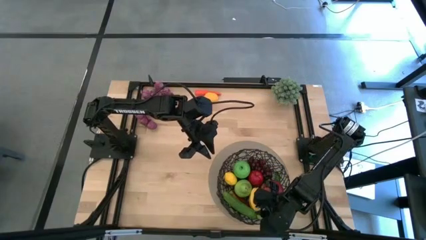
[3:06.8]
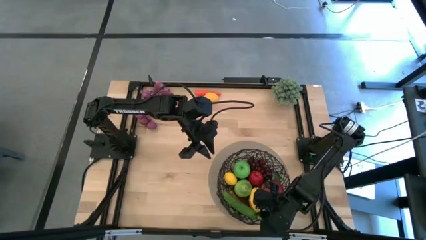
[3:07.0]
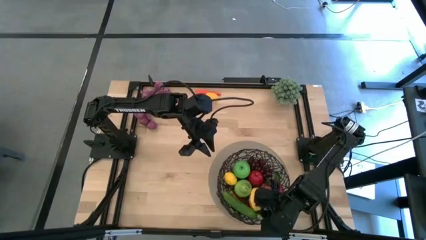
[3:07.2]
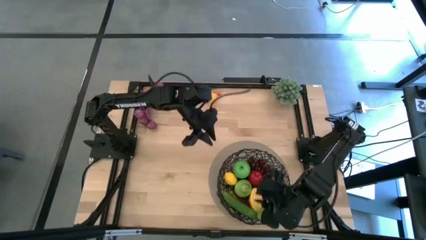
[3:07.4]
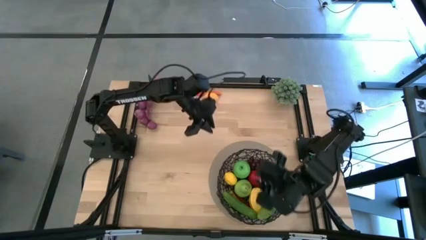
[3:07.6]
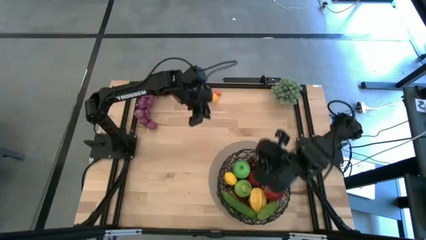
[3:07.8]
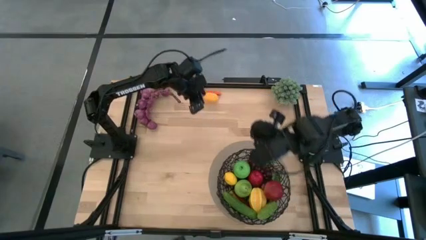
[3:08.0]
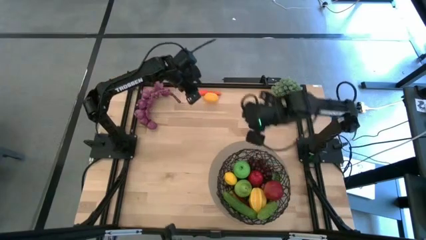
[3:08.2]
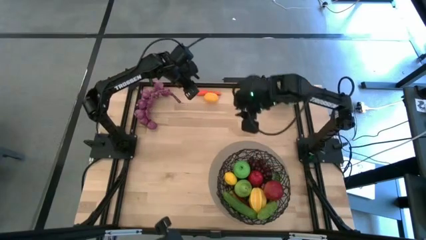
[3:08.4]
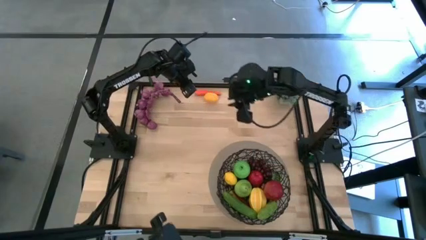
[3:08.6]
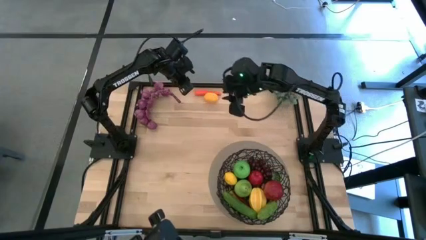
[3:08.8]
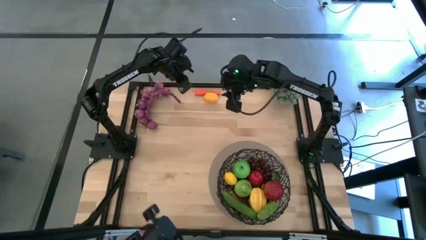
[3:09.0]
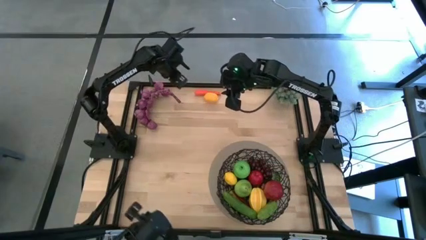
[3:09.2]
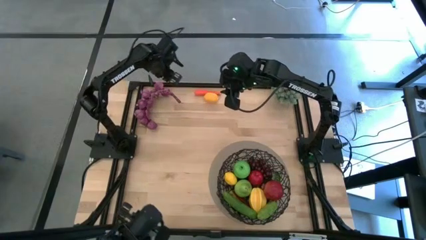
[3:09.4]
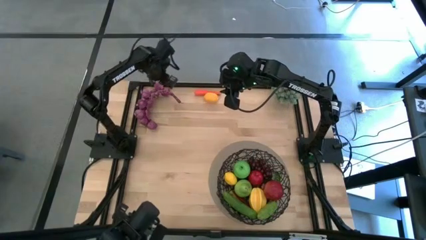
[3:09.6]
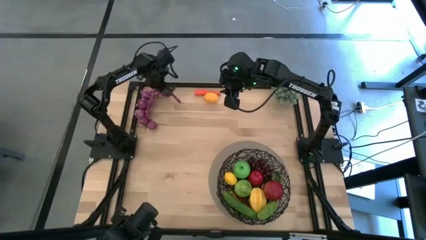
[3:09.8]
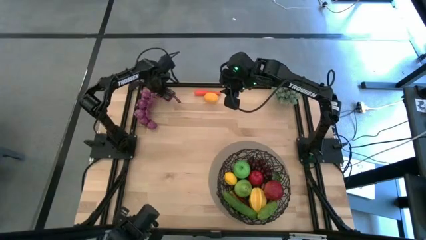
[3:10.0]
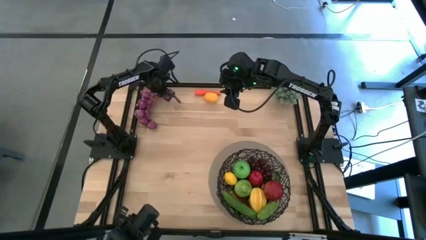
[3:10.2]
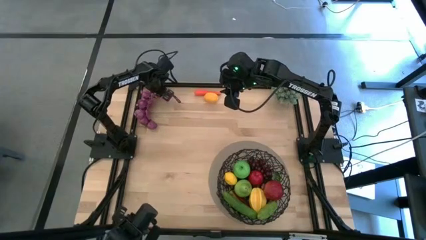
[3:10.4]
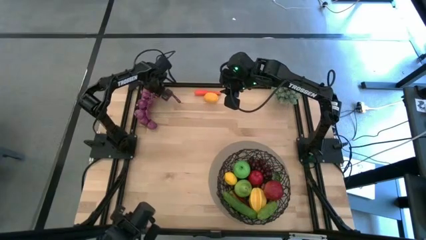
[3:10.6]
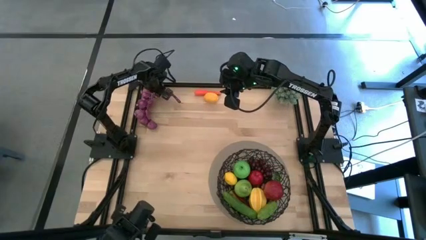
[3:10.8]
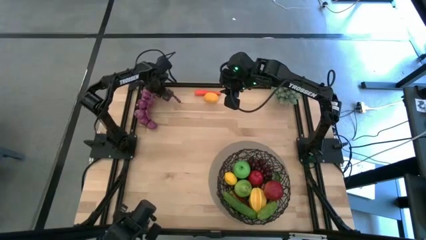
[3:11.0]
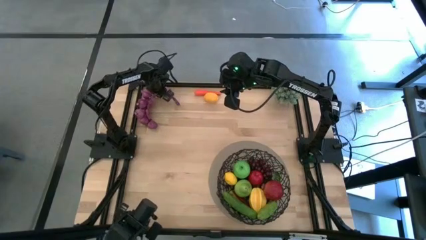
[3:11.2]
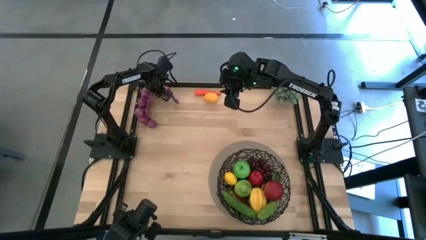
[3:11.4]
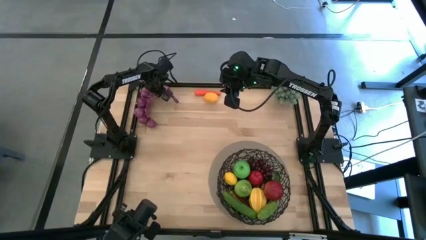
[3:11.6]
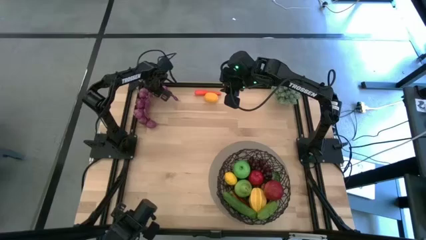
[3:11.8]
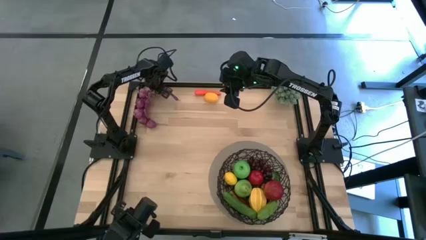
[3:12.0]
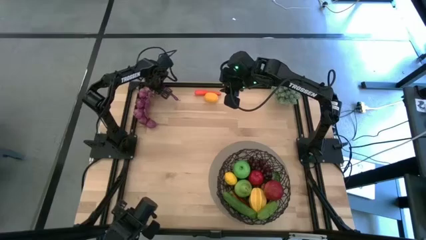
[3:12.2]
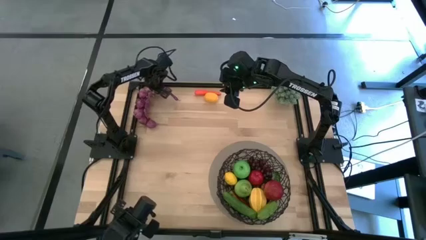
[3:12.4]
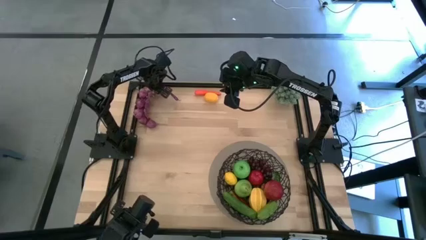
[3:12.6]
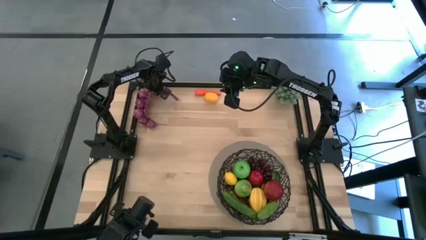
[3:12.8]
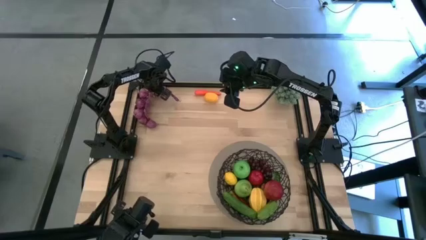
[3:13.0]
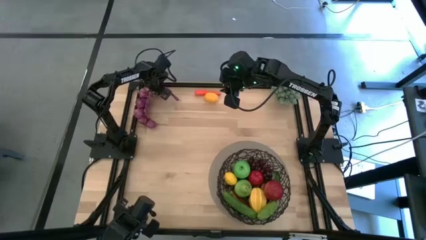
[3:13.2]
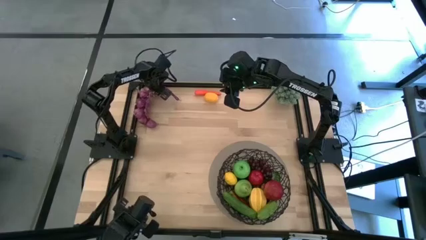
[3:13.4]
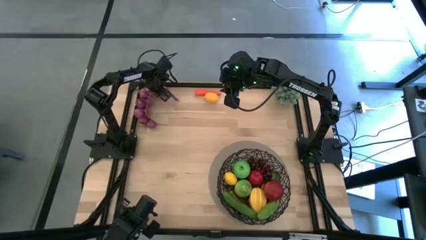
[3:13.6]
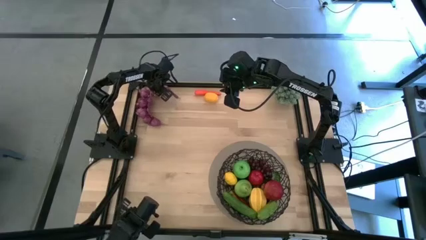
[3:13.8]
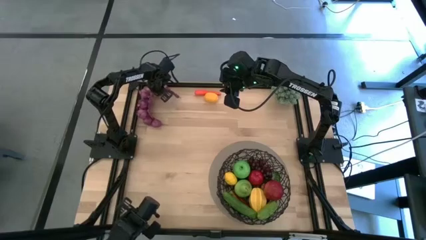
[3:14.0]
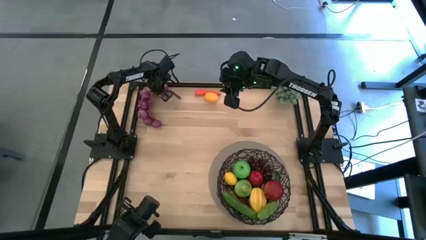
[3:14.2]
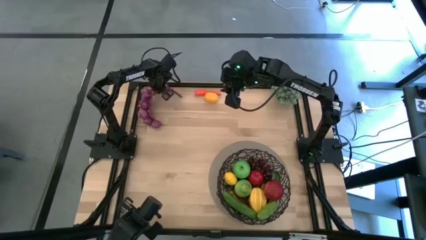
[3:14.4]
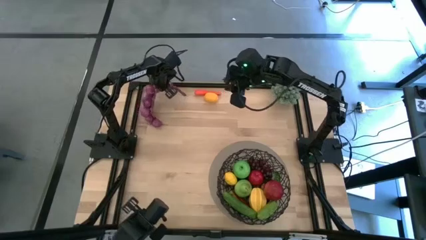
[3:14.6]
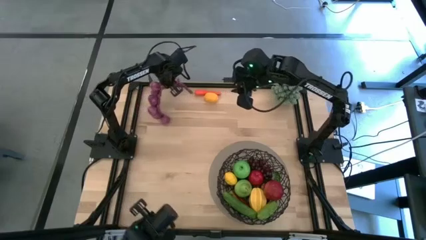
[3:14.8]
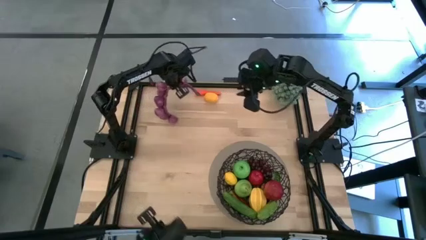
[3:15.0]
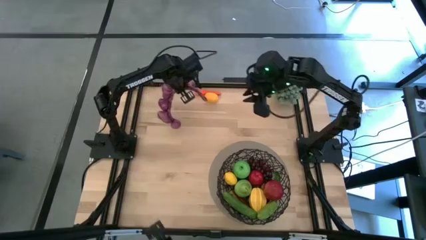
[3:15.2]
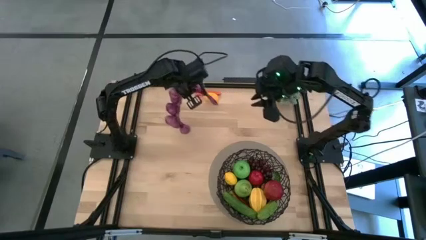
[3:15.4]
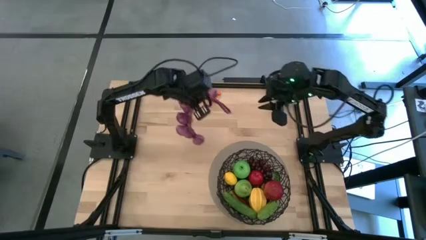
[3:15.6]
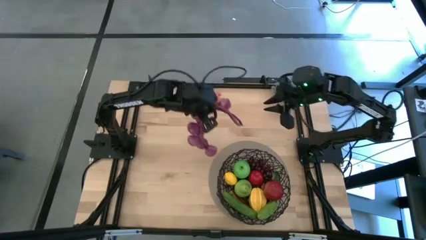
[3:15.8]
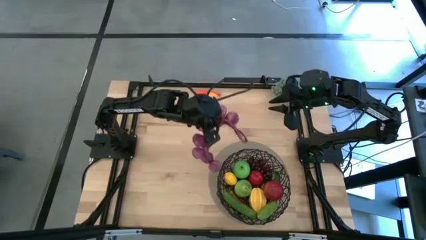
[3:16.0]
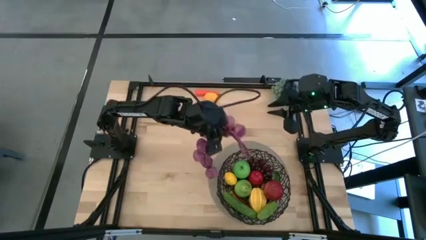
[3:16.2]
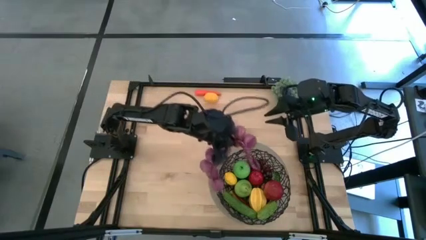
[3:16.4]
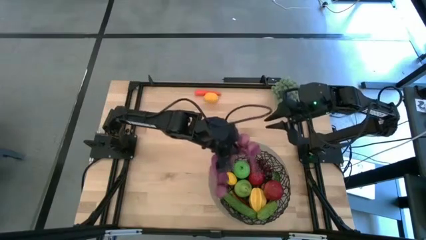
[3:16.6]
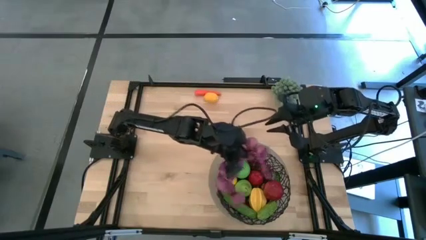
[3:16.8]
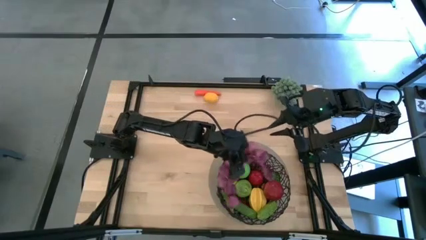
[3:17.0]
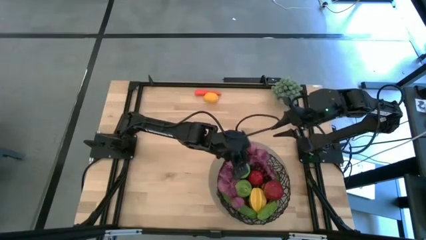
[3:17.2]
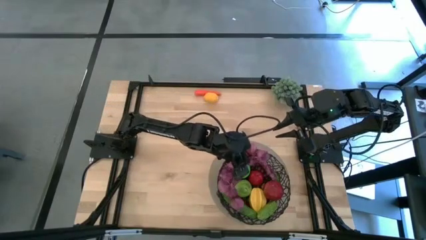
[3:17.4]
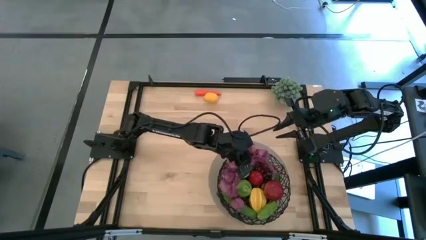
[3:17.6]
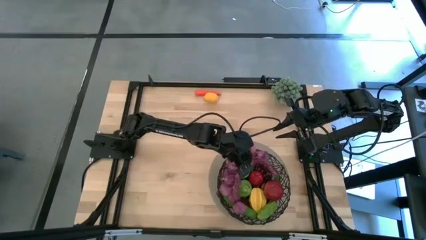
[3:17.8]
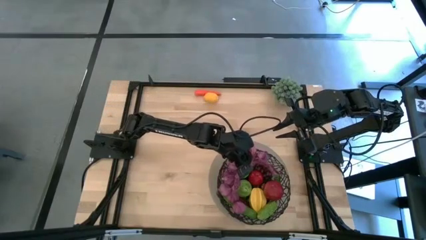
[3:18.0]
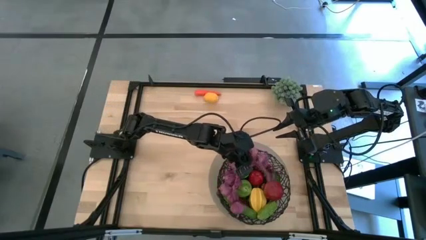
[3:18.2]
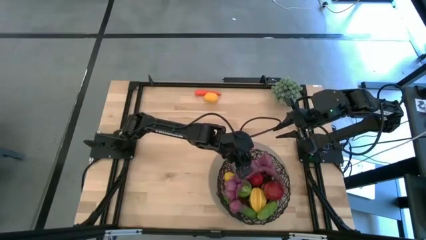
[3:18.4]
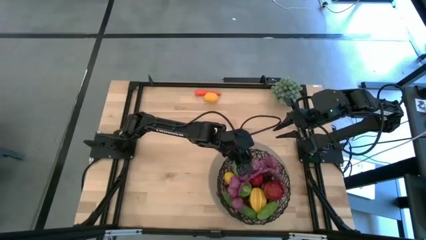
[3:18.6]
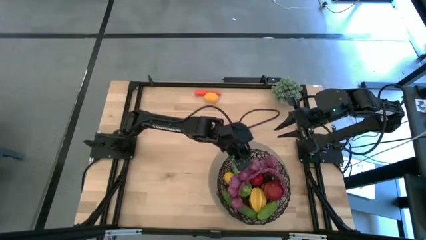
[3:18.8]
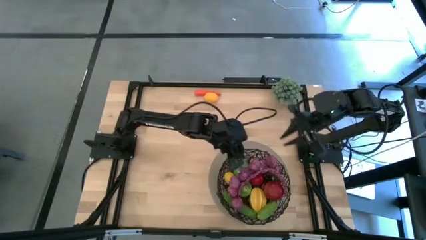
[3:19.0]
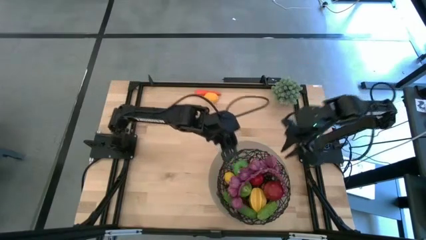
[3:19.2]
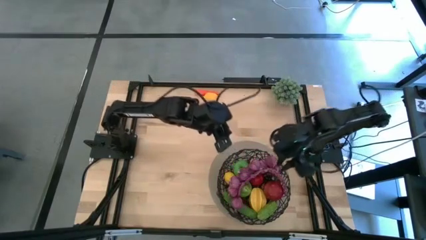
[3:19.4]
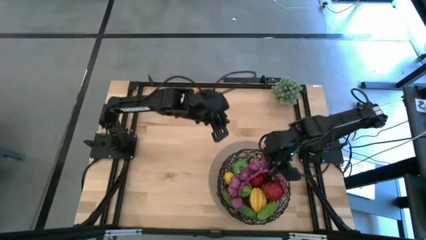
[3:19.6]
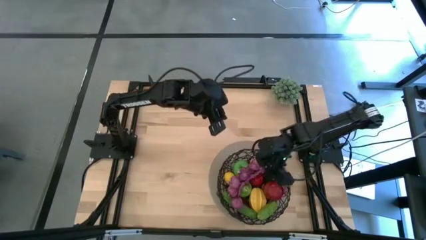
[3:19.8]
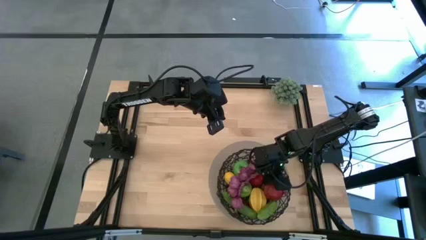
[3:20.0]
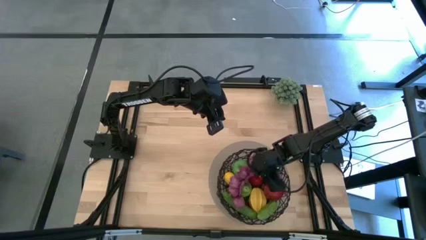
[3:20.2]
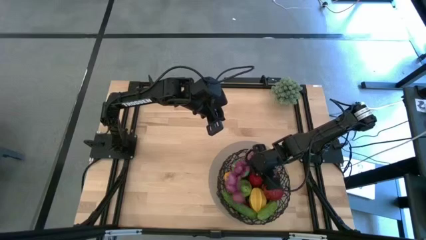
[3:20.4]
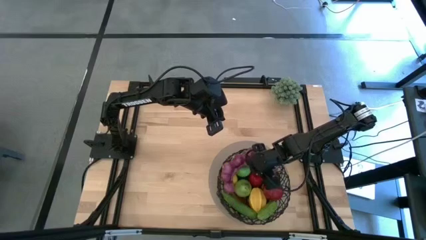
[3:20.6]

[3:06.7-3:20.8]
Task: Build produce basket
Put the purple garlic into the wire basket

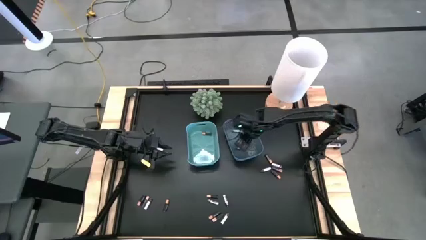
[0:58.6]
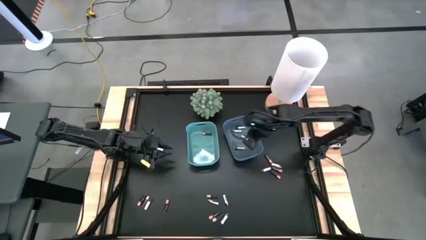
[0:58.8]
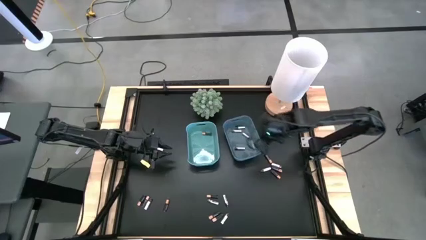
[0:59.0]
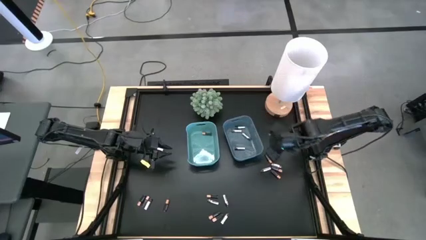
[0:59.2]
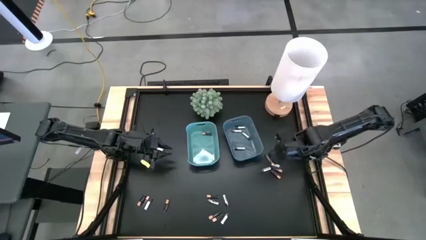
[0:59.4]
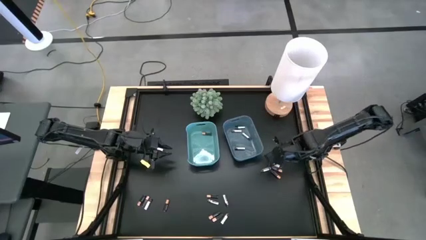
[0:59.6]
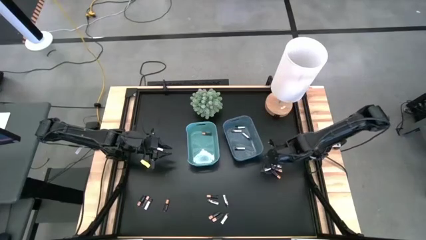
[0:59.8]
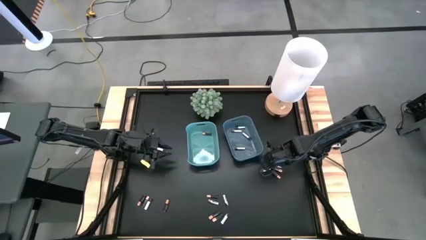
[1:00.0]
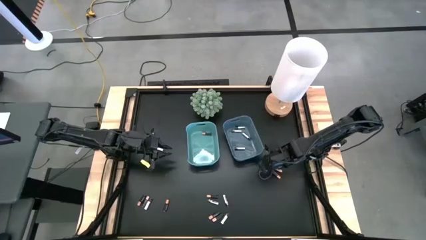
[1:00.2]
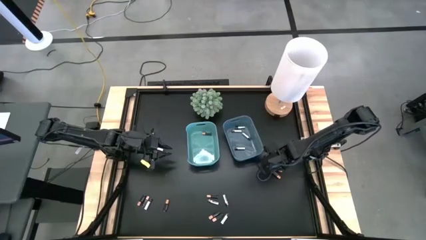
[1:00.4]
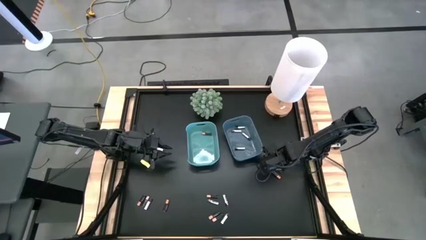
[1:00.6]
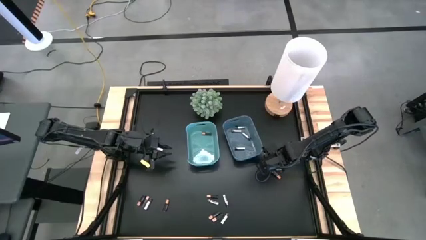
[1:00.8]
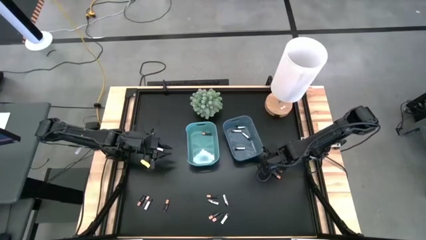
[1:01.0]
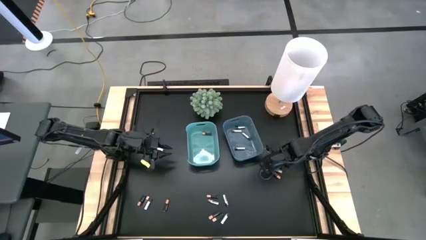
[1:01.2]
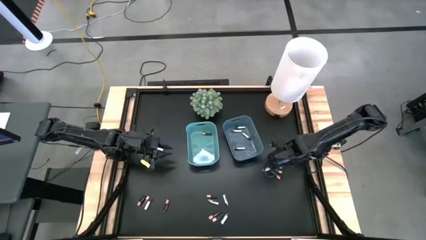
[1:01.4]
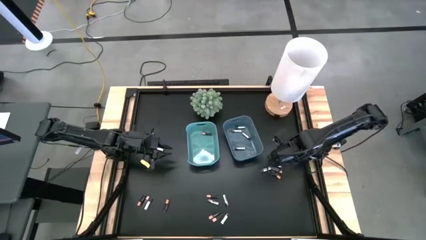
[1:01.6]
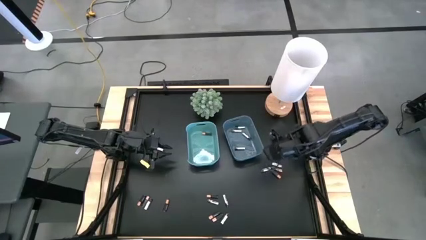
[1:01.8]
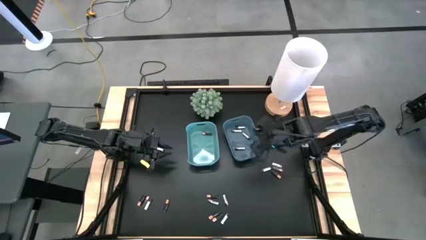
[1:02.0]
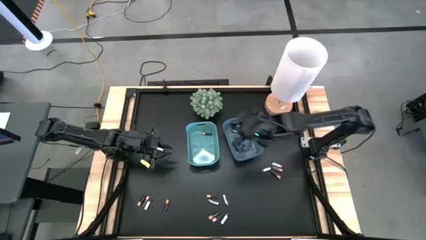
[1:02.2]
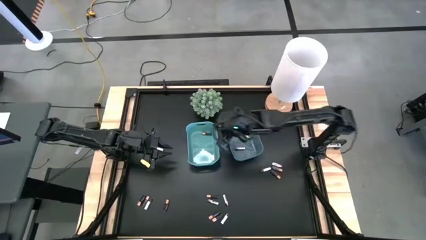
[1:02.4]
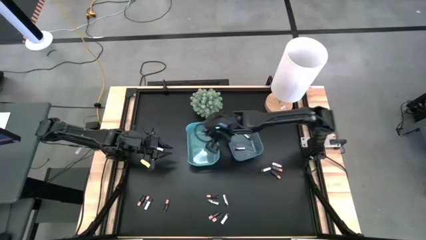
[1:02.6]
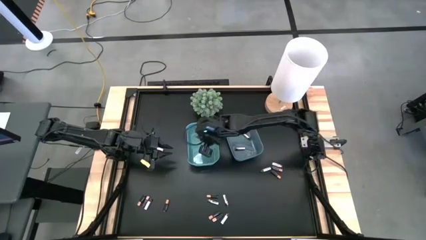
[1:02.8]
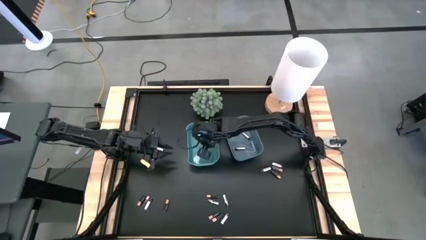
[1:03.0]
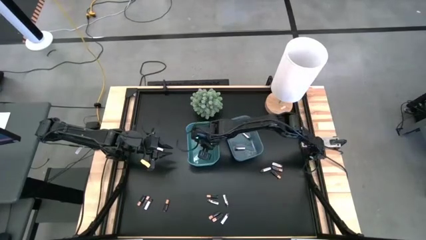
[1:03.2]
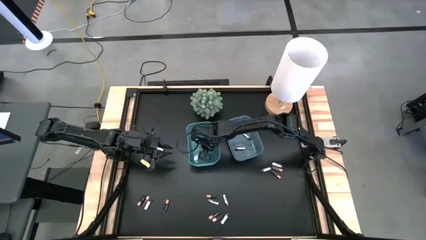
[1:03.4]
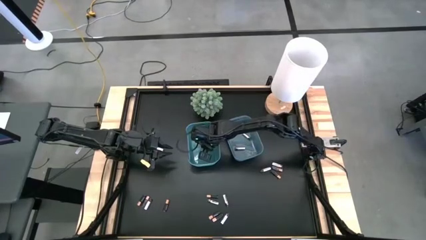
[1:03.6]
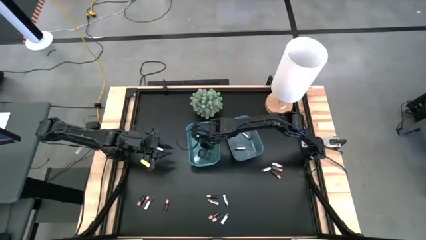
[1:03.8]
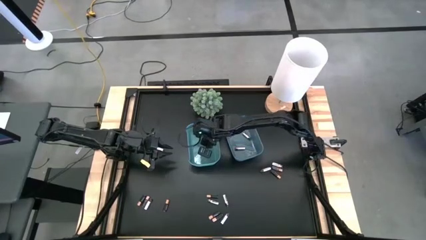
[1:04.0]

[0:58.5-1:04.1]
Task: Sort batteries
Put the black battery into the green bin
